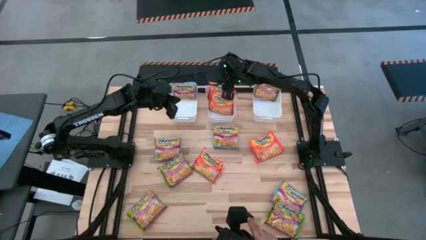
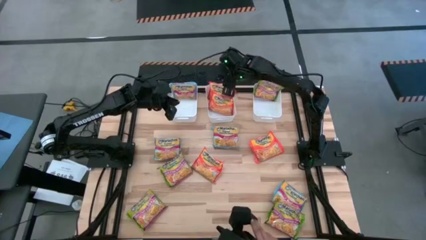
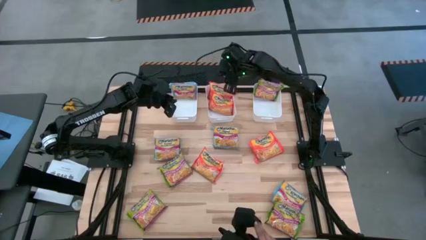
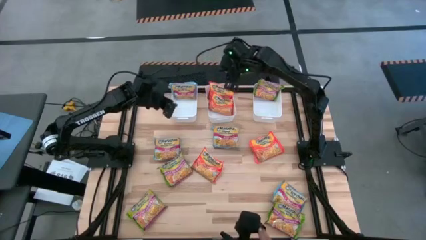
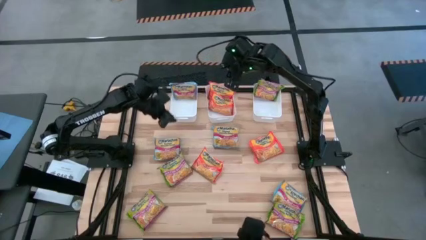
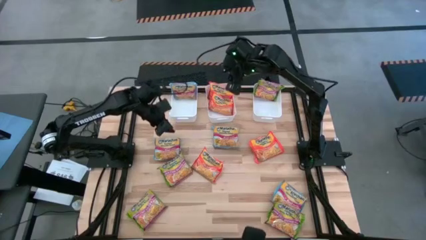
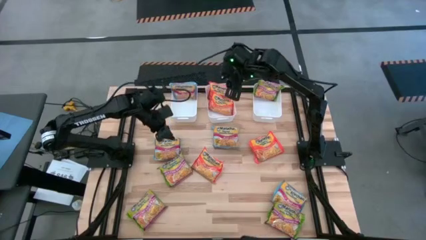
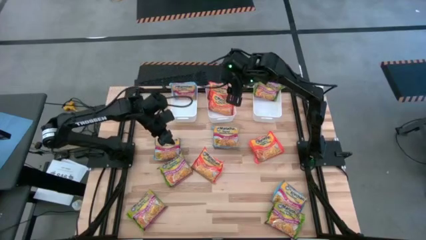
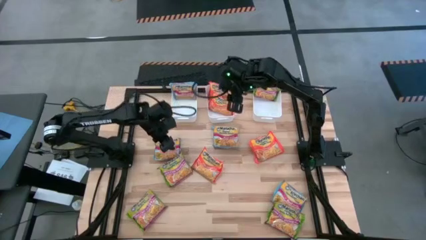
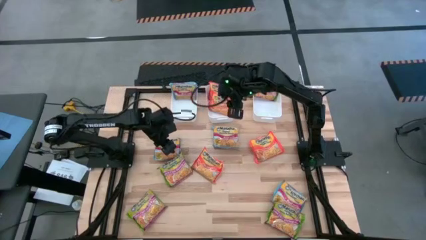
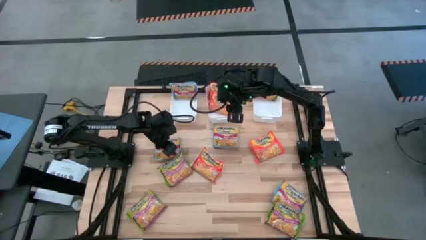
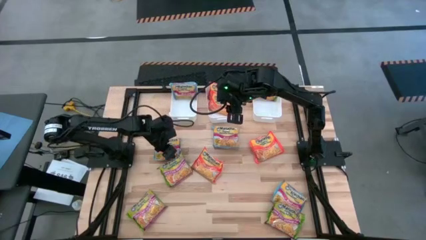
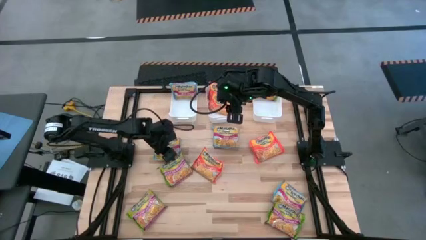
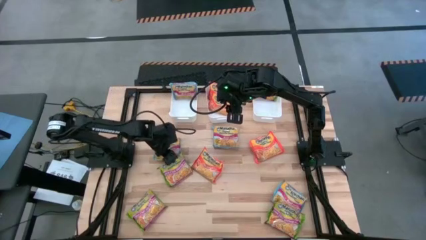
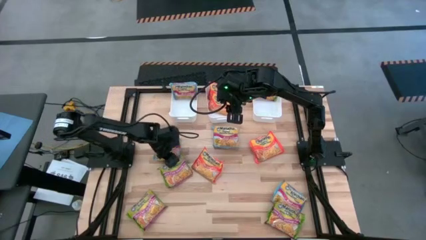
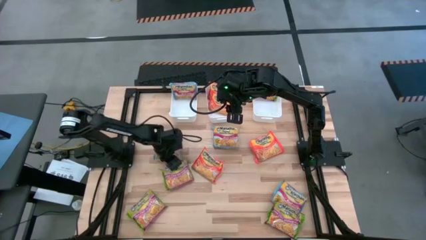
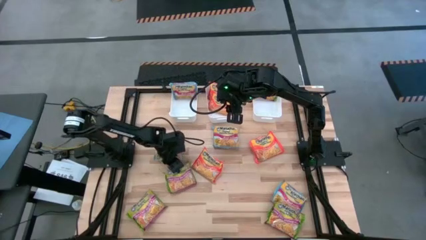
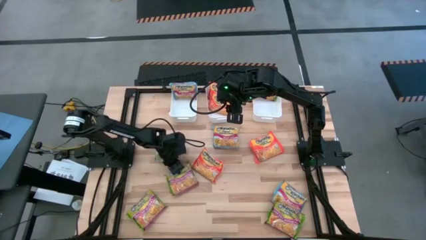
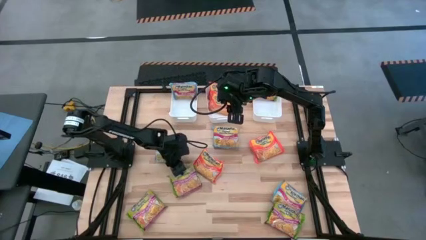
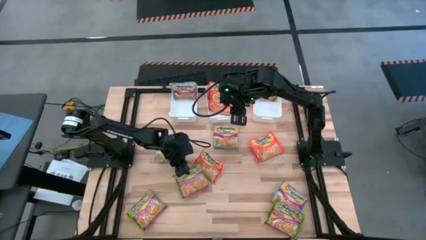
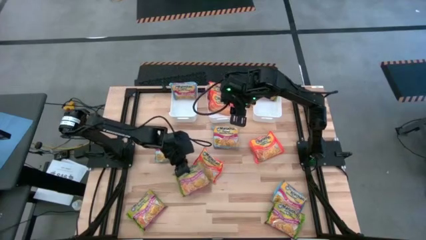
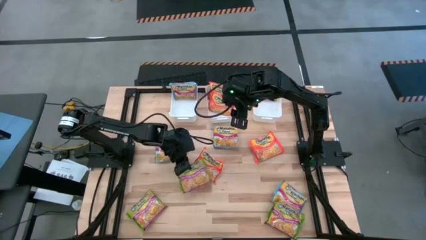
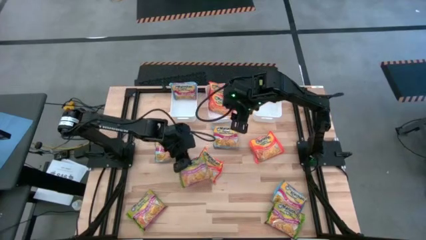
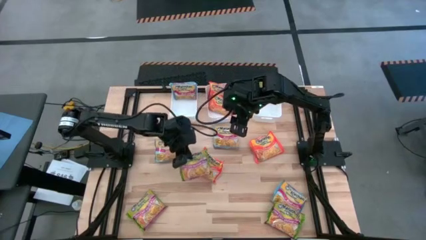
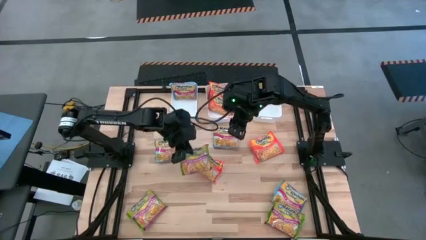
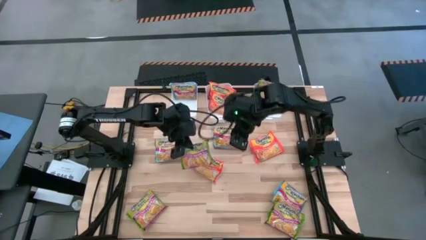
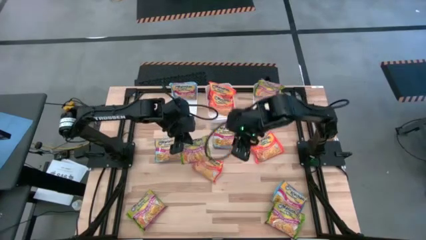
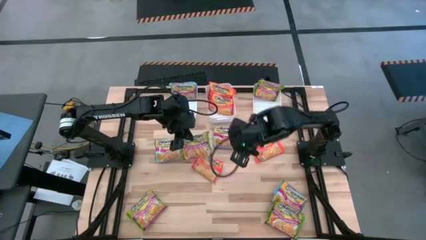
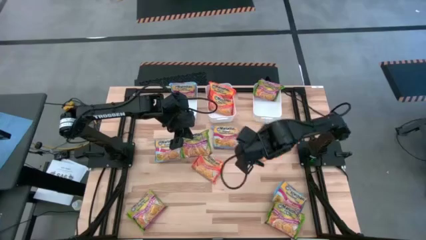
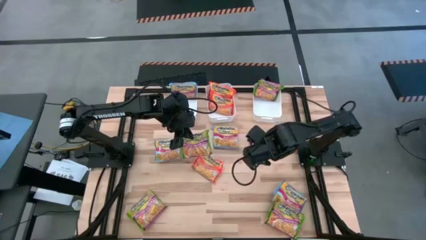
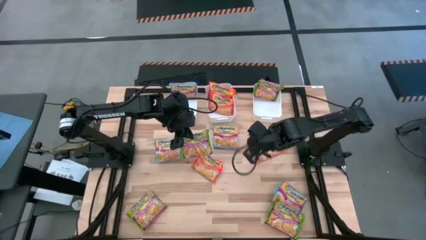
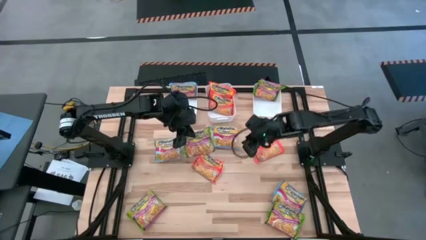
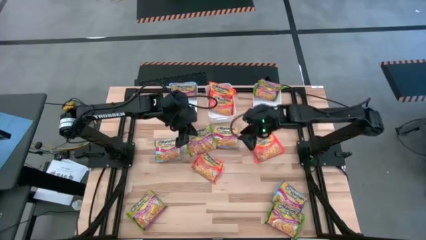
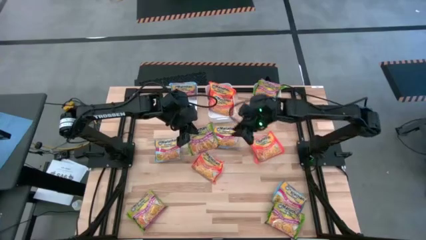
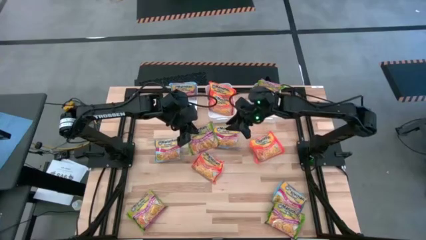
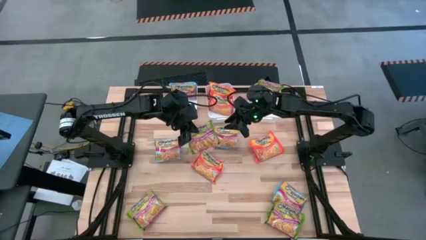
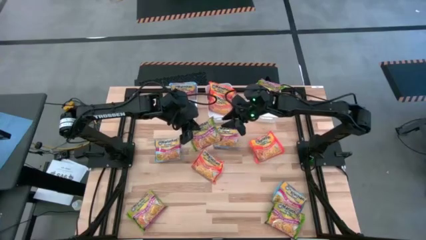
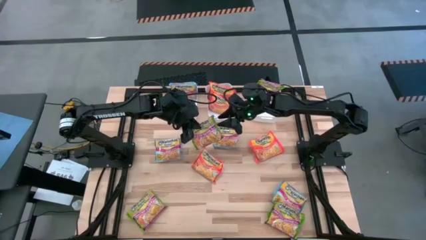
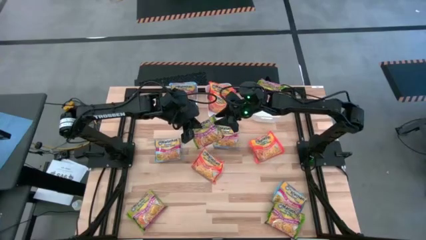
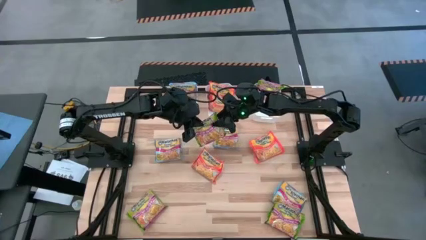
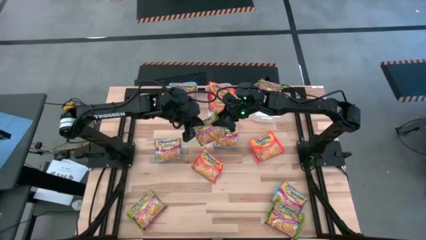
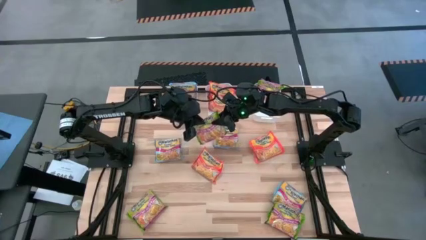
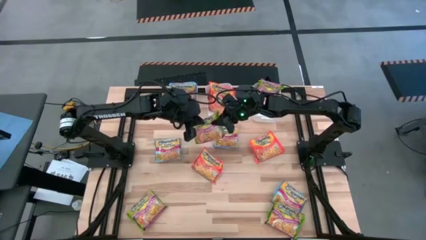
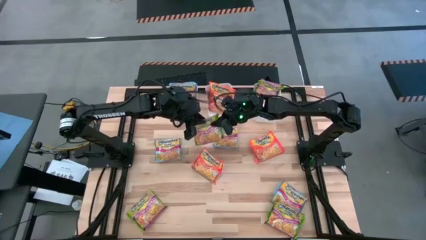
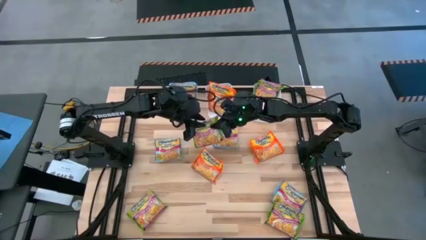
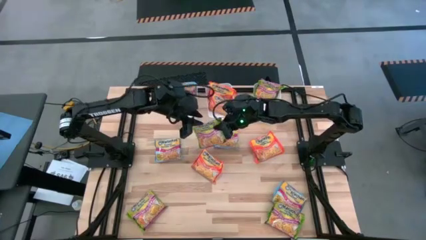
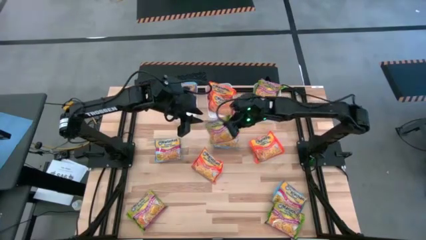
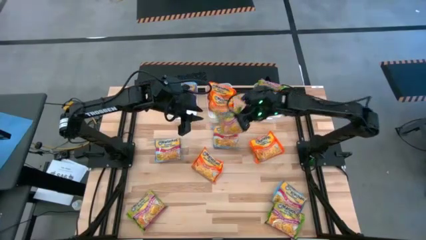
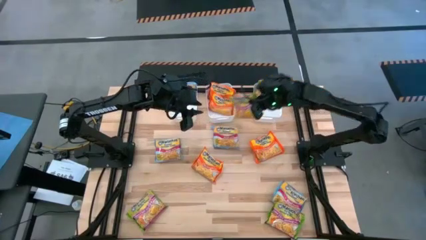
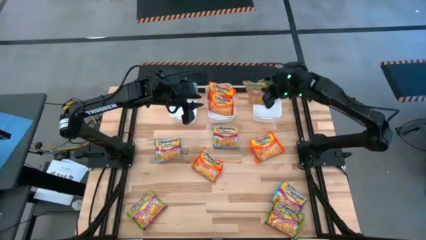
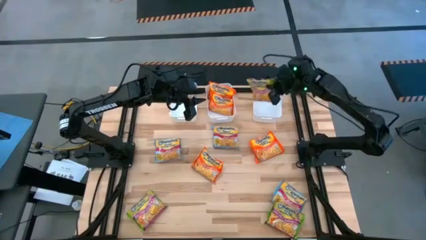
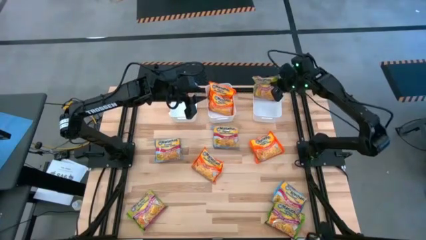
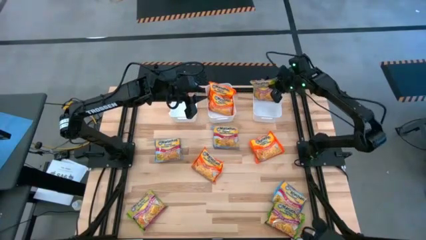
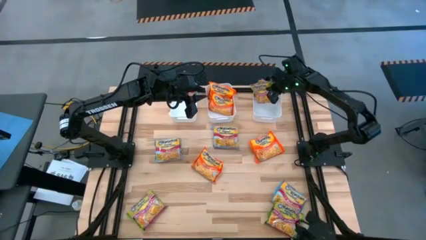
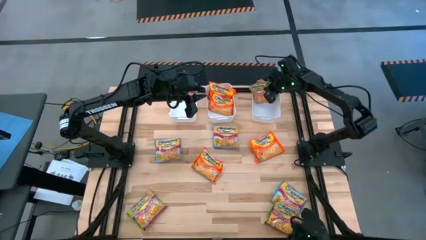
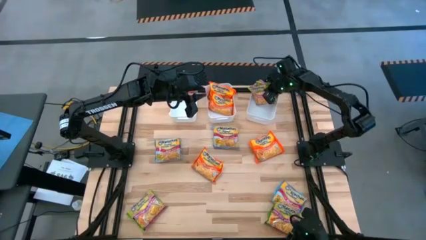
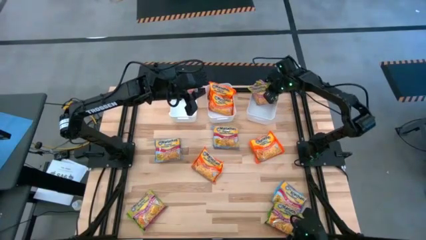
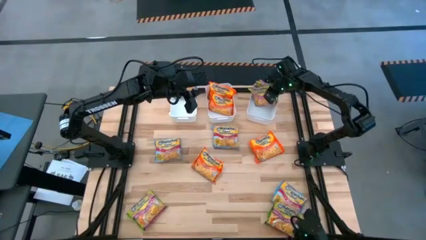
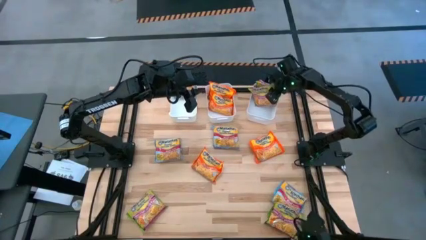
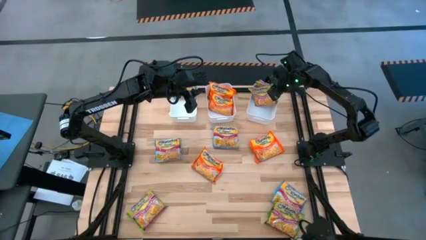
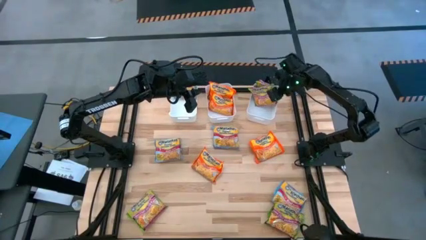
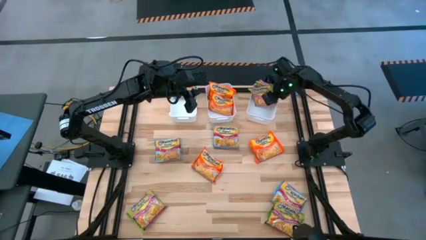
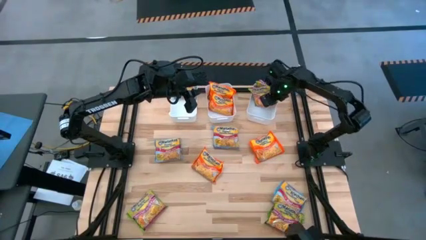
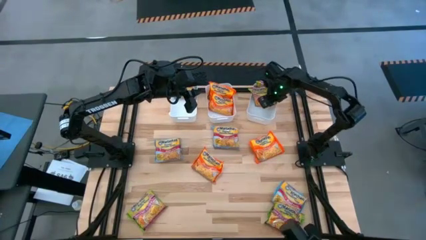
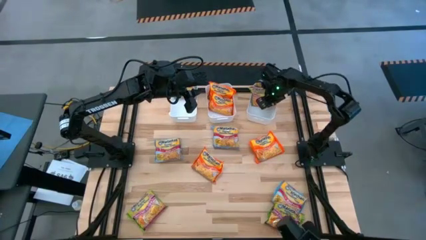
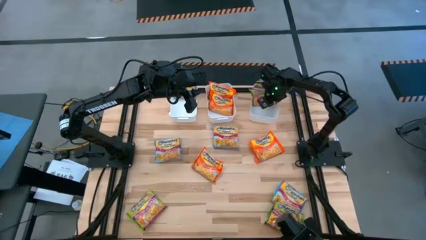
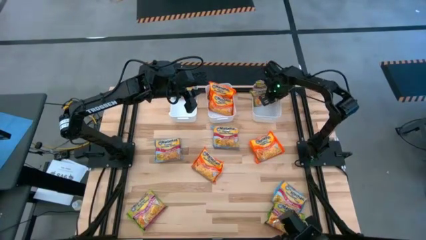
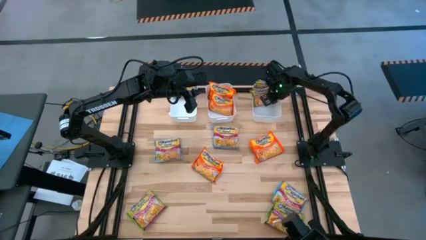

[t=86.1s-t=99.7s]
Task: Sort Maruchan noodles
Put the green noodle pack into the right white bin

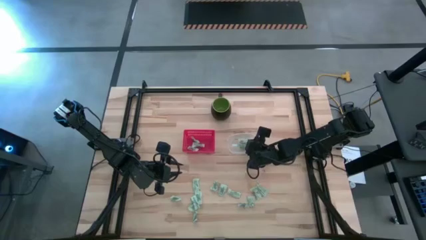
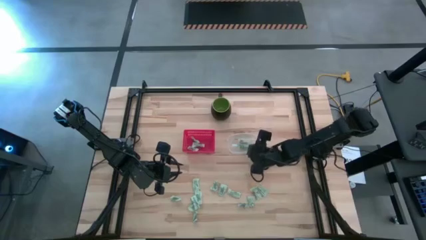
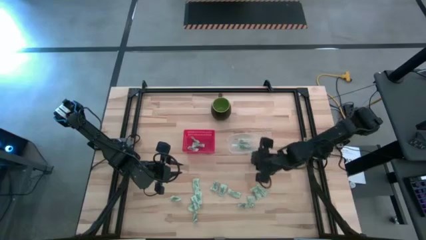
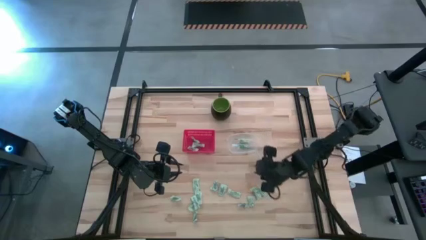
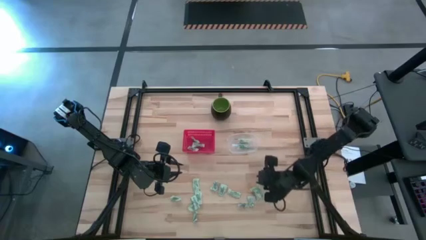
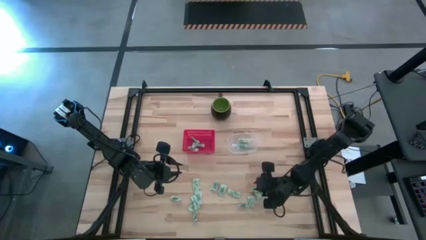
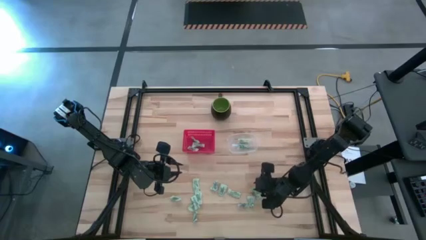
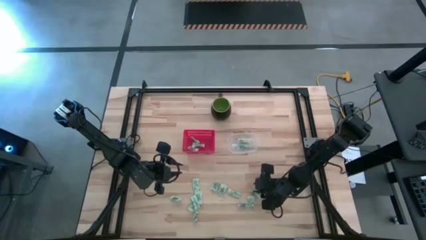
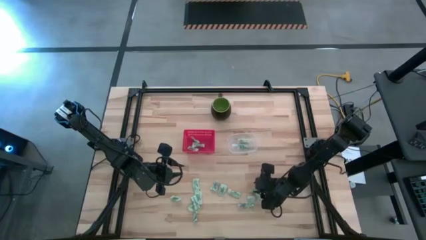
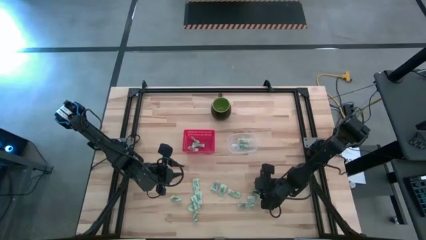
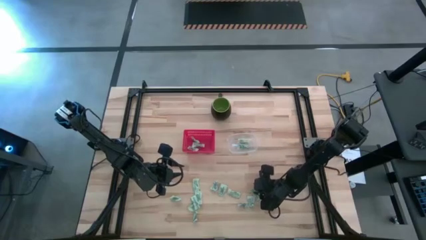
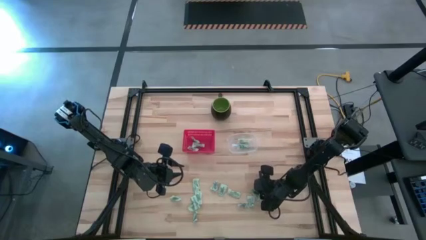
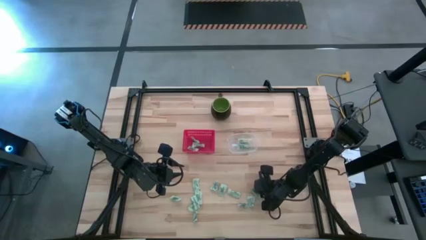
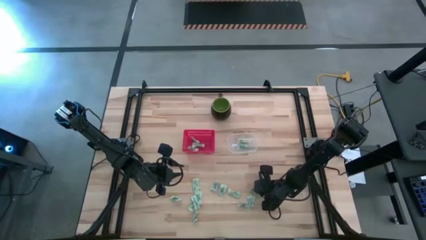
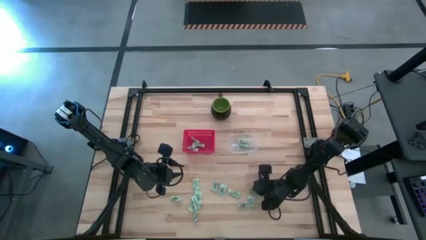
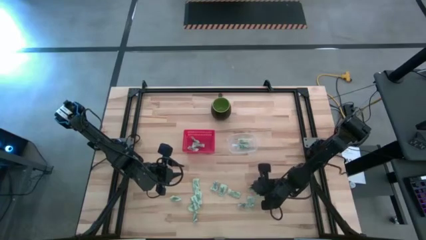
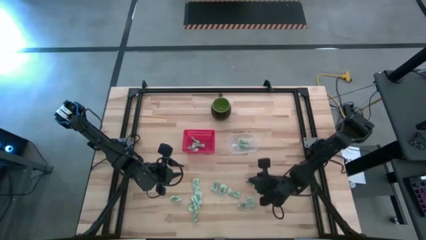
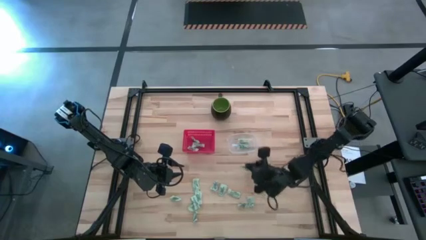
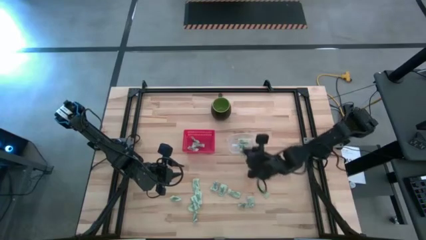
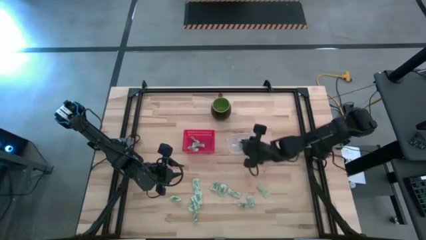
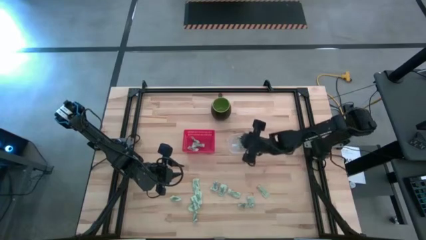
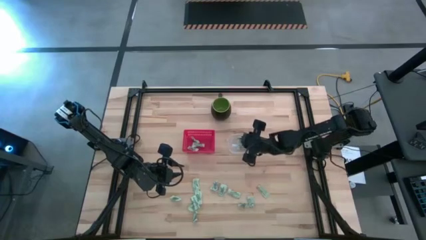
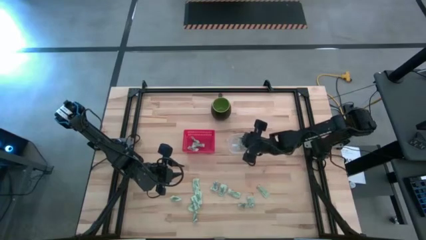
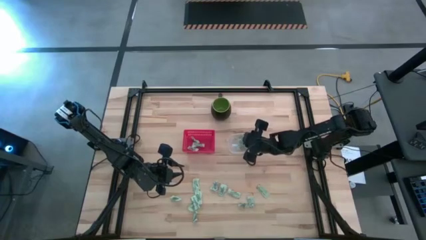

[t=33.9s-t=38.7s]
Task: Pick and place items into bin
Put the stevia packet into the transparent bin
